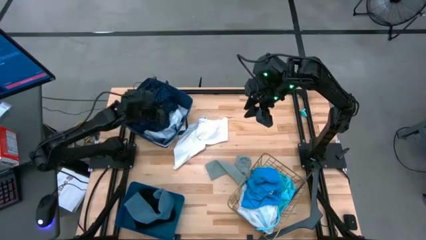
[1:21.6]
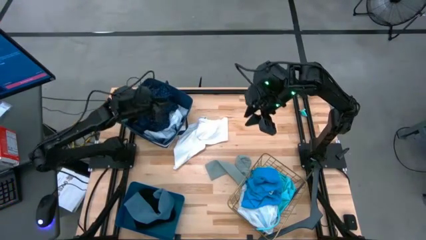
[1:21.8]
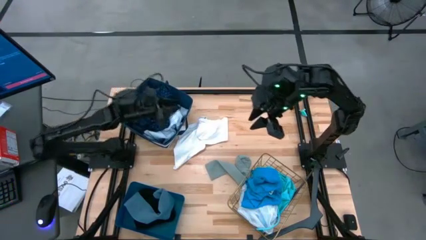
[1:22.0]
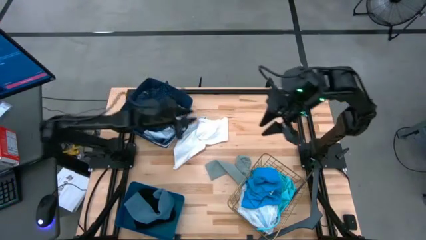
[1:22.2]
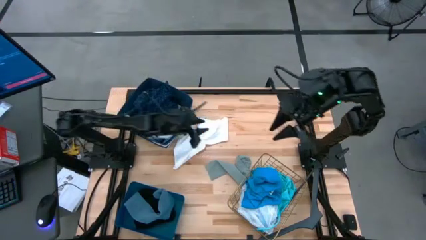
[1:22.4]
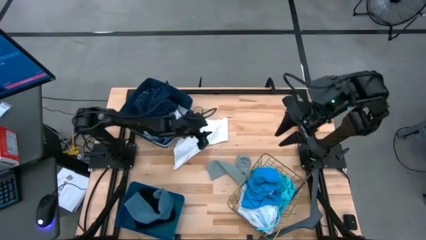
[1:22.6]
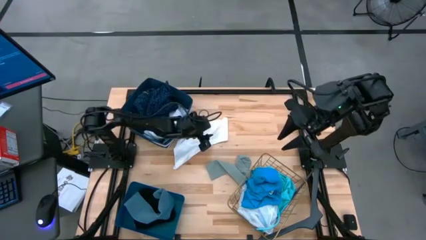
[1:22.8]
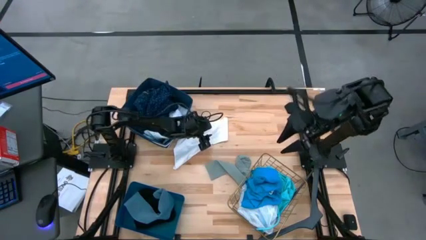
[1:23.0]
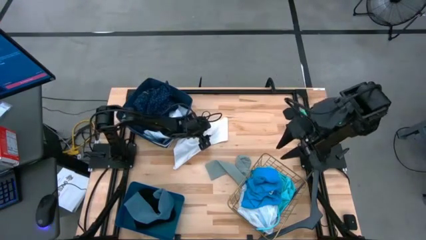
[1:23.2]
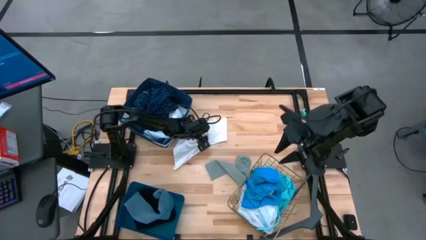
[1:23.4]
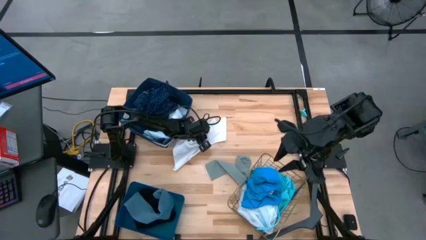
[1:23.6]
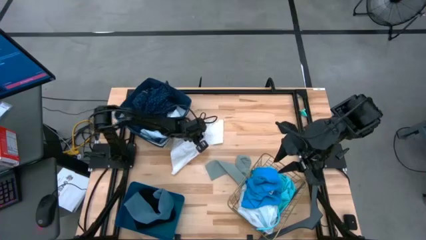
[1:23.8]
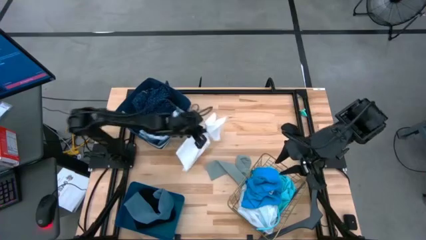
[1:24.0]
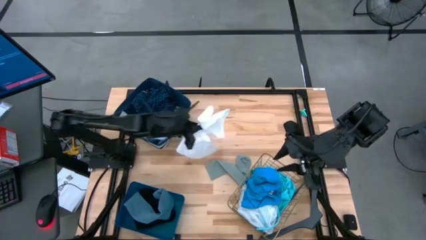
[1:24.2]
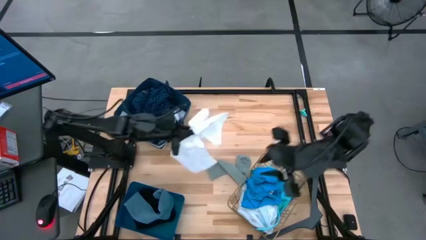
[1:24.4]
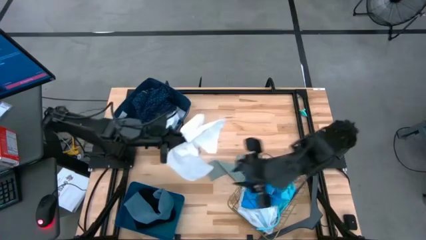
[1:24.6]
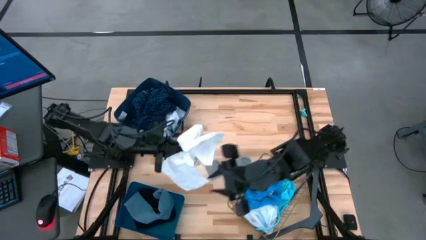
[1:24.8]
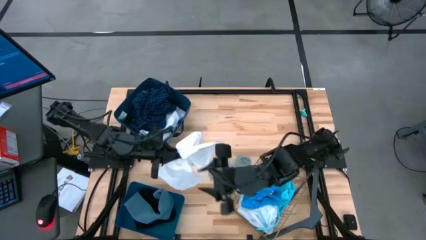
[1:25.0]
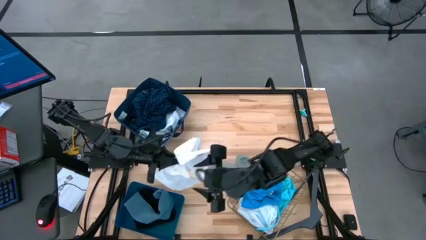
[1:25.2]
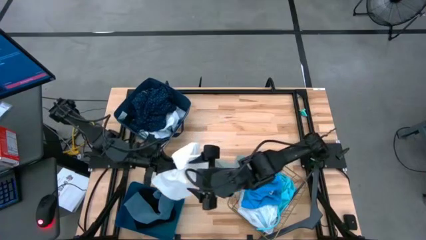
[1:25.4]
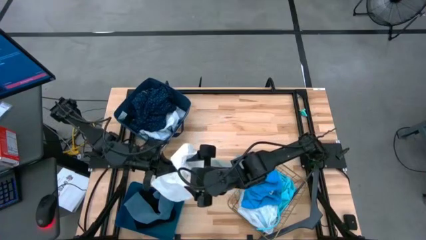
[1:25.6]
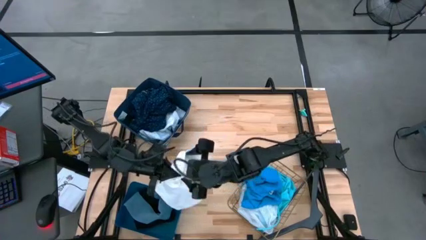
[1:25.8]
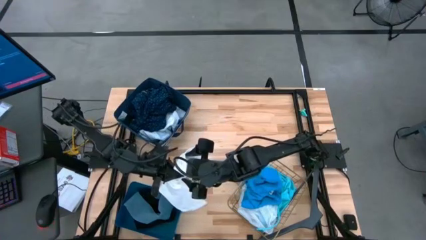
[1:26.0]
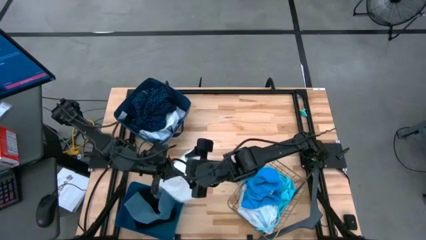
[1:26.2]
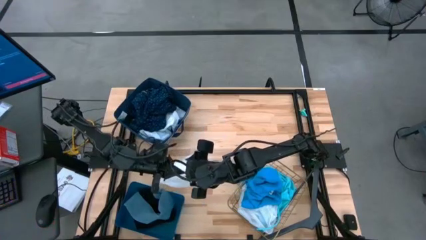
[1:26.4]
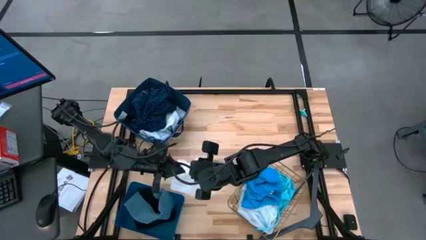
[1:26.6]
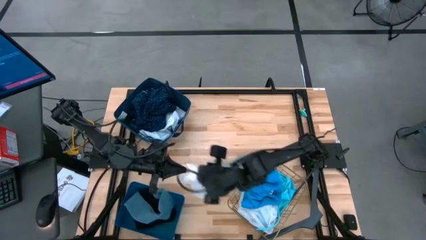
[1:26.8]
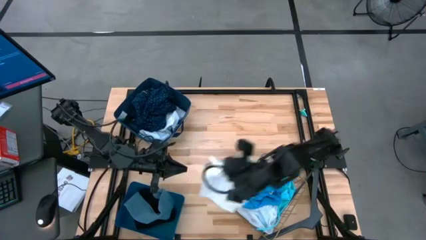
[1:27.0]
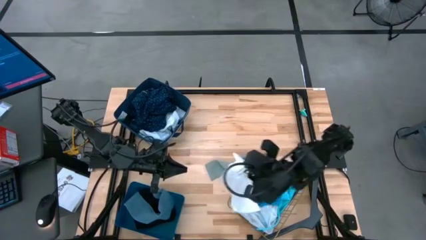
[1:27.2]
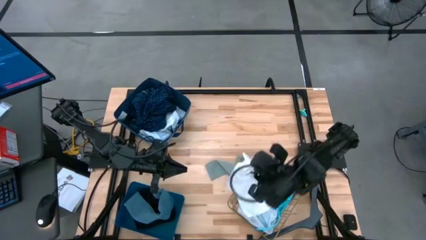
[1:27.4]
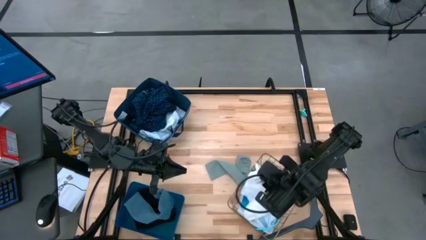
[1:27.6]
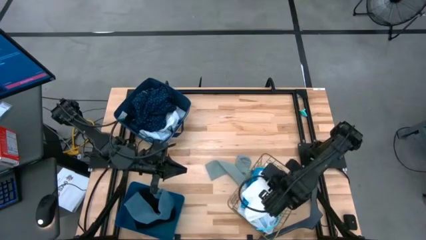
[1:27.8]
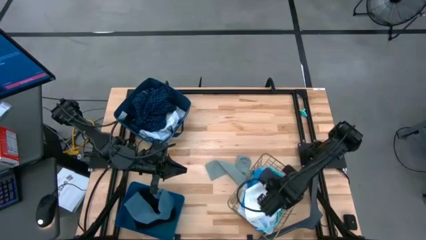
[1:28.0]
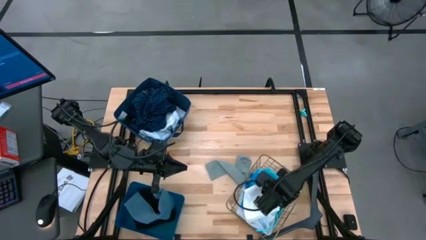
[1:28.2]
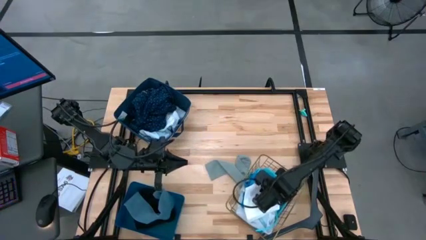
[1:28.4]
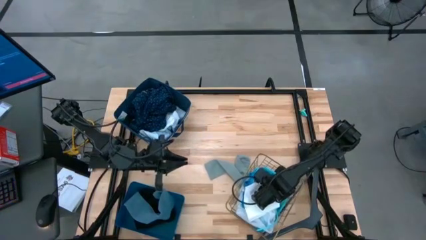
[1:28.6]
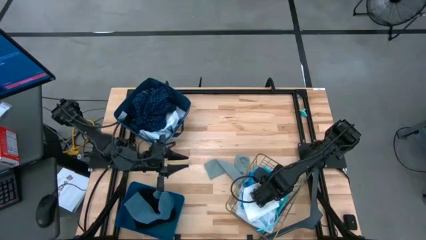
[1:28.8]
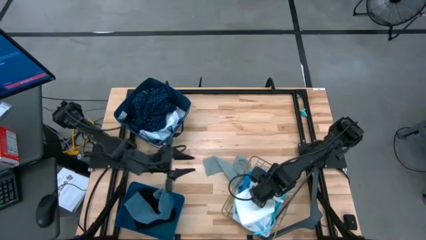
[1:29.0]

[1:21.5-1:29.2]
Task: Pick & Place Cloths
Put the white shorts into the gold basket

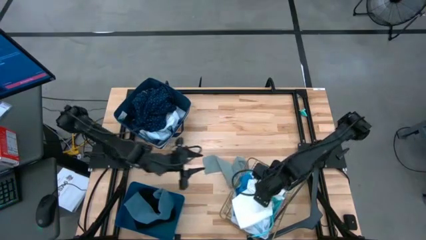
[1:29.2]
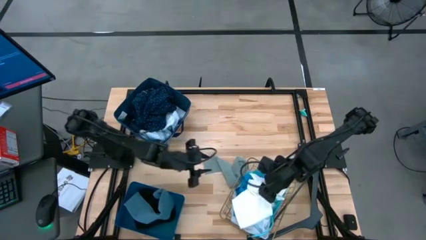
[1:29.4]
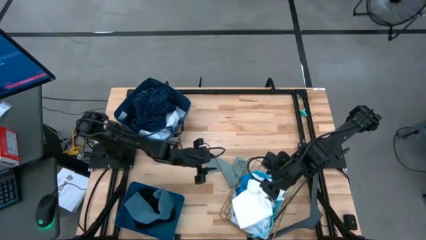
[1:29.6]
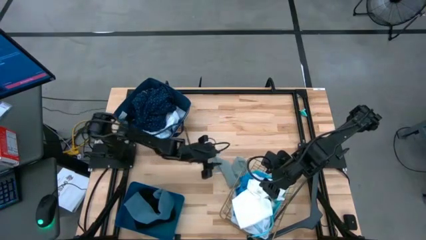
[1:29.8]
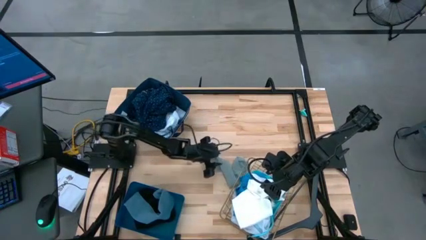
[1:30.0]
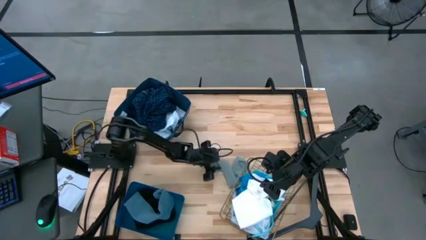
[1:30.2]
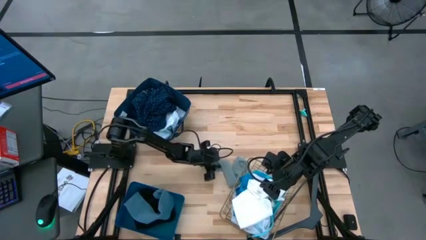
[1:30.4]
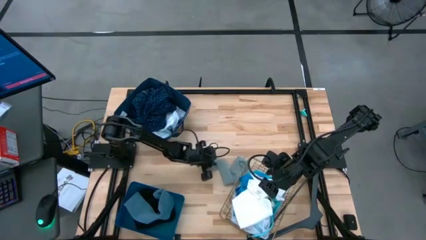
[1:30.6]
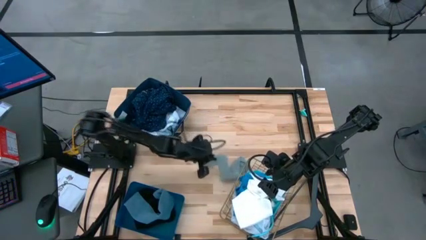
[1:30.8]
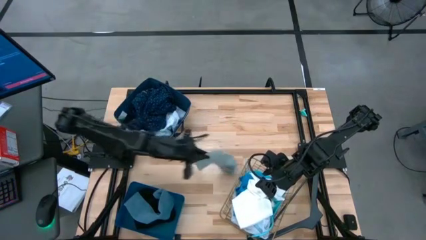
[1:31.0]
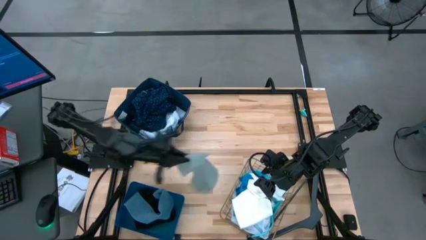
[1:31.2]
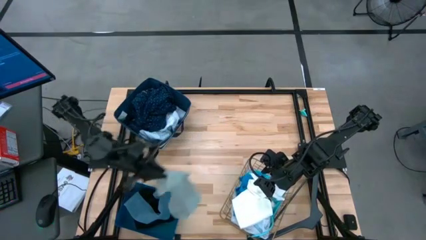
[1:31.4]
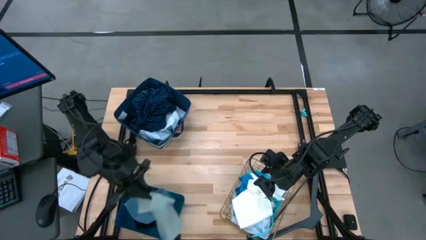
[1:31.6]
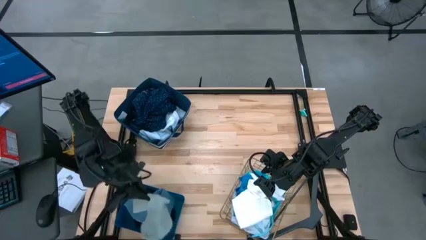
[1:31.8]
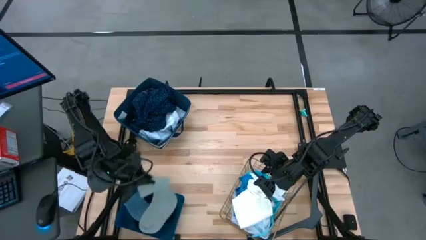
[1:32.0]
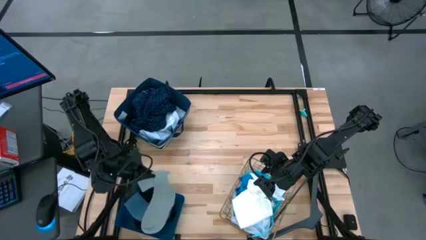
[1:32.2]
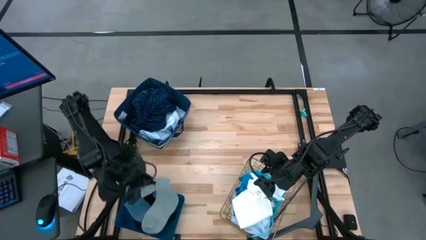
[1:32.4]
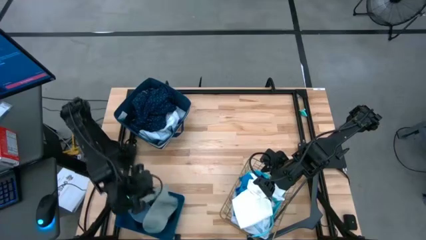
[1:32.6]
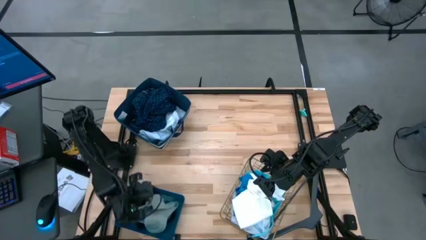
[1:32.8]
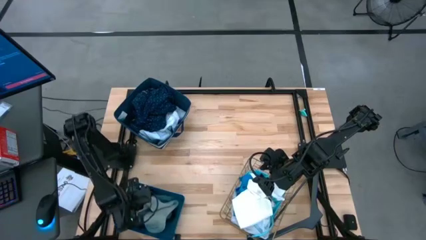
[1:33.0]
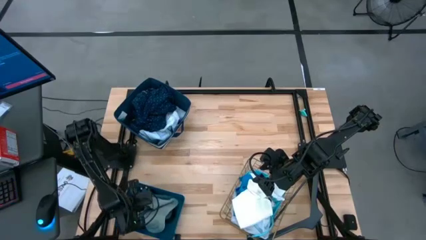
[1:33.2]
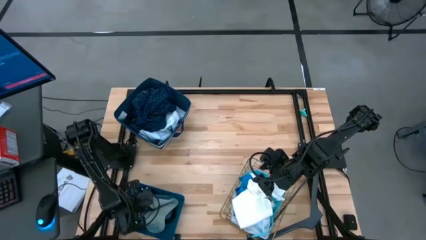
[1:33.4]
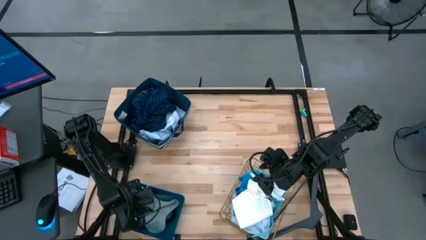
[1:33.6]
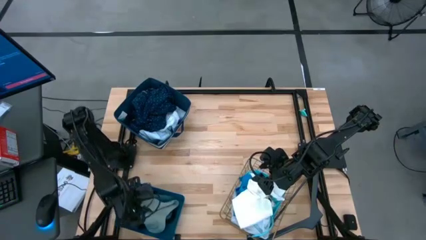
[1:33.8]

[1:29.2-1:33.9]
Put the gray sock into the blue bin

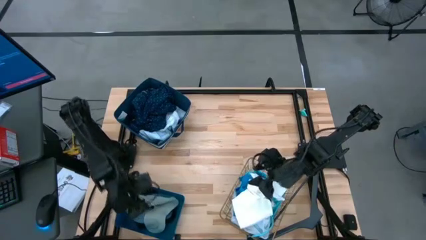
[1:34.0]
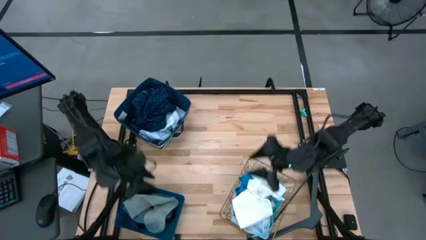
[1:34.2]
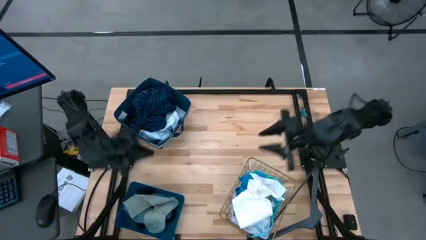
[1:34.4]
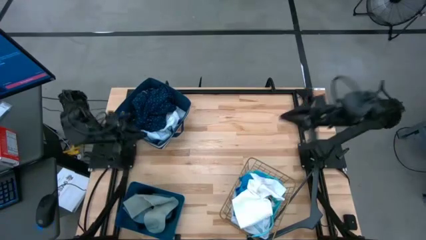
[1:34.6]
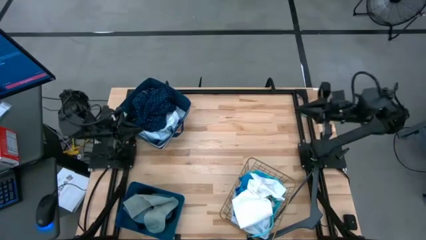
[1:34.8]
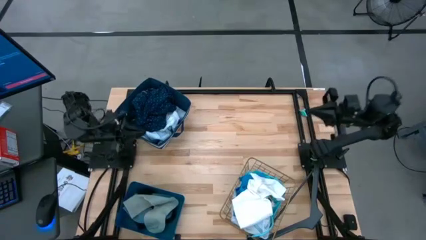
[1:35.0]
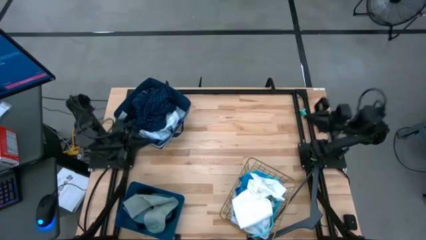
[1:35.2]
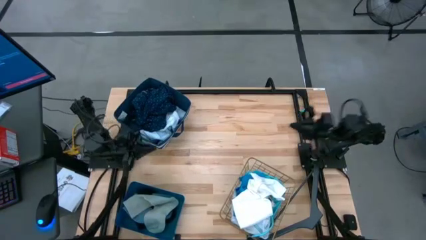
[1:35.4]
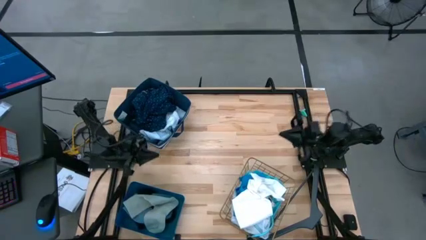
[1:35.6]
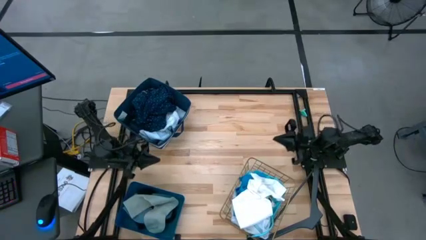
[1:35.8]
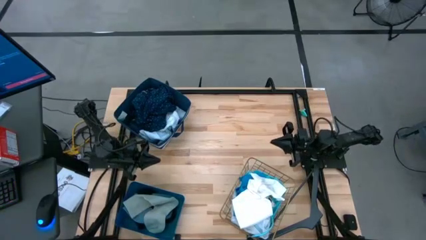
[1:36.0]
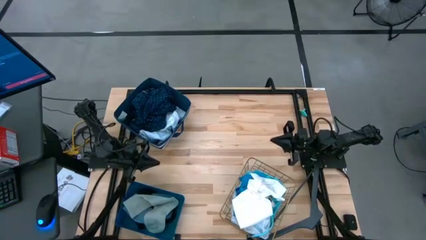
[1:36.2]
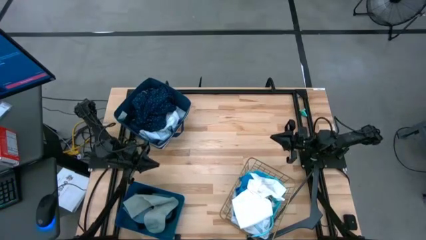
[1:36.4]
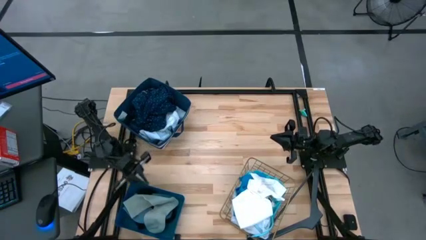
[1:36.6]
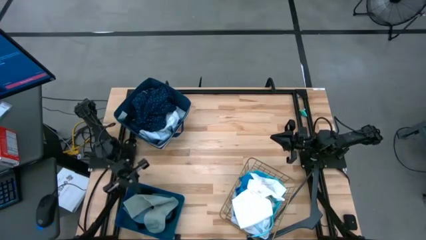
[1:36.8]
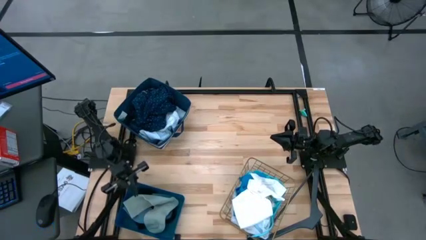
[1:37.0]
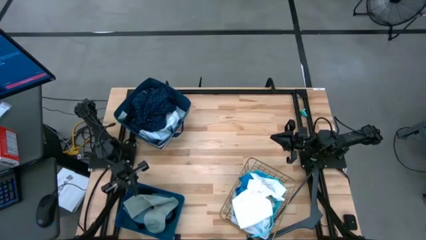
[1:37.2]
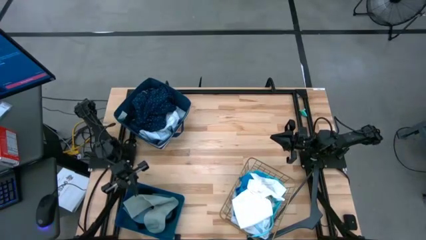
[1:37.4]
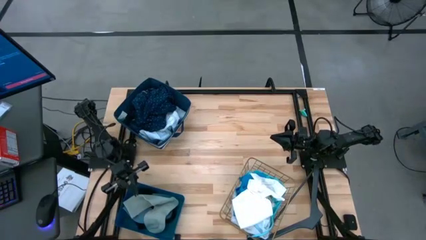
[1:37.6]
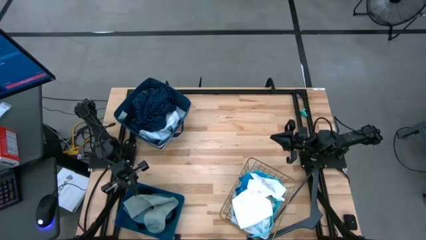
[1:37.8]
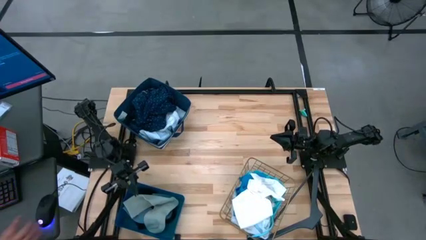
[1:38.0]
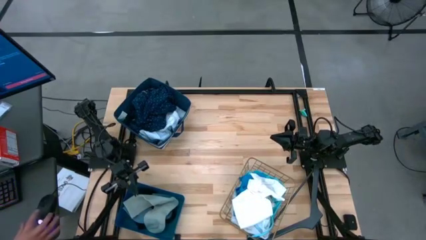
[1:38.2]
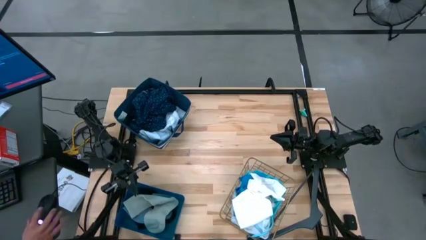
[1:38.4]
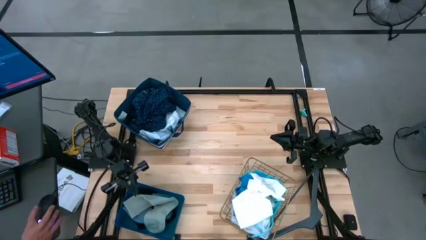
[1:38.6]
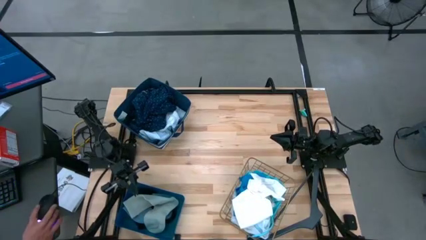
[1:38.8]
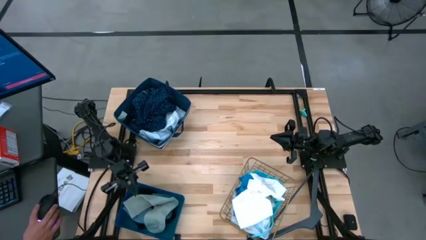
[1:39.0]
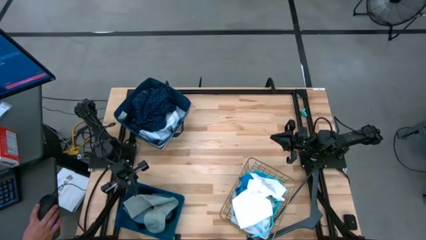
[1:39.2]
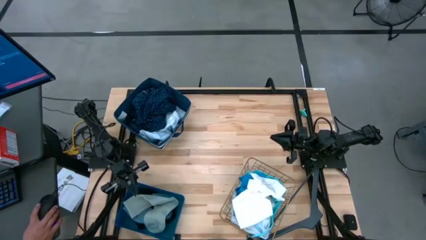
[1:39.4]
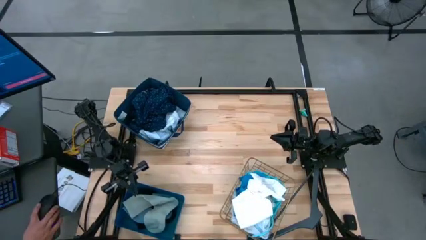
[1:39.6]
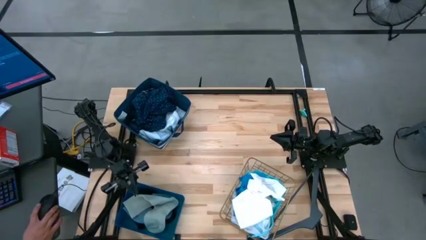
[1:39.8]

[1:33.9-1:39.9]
Return to Home Position
